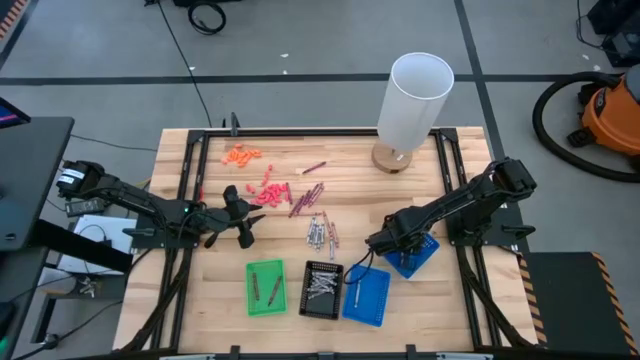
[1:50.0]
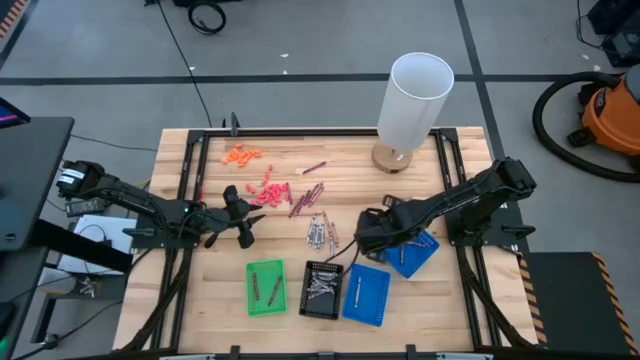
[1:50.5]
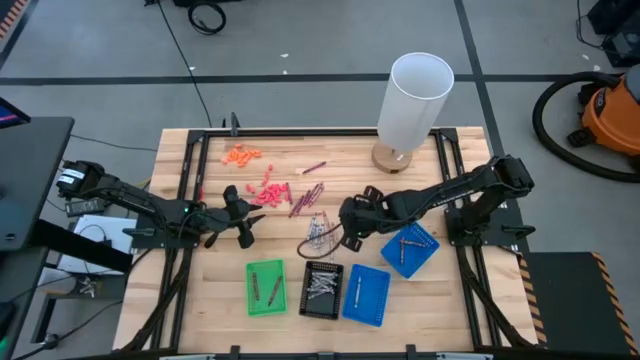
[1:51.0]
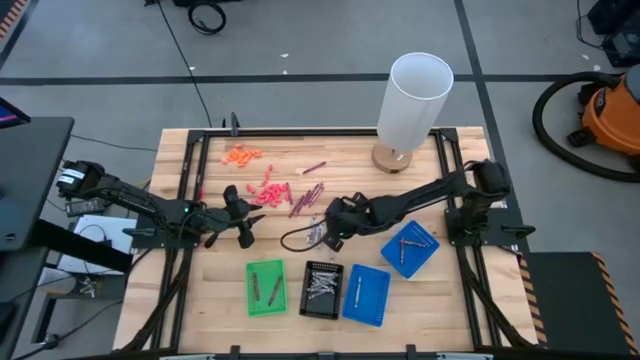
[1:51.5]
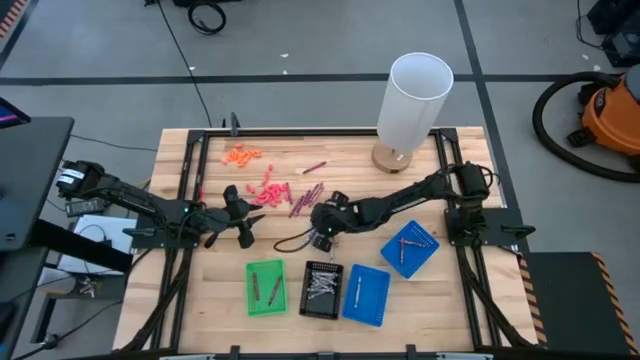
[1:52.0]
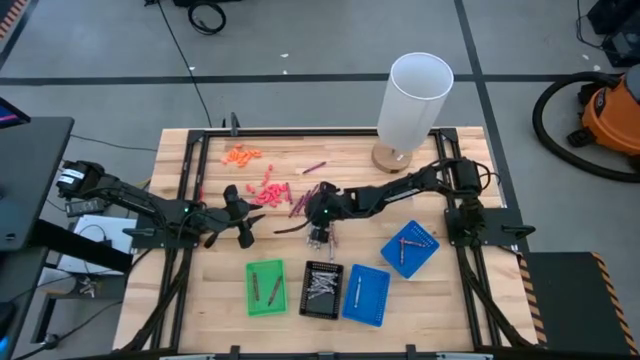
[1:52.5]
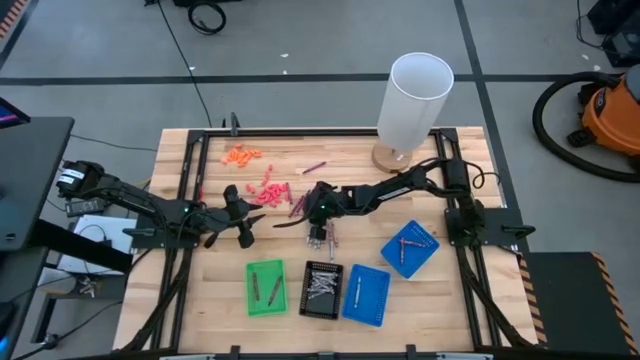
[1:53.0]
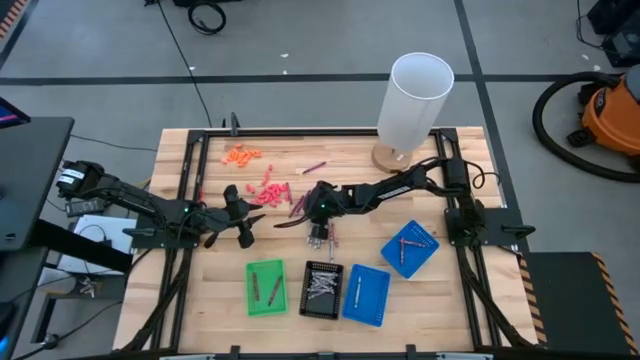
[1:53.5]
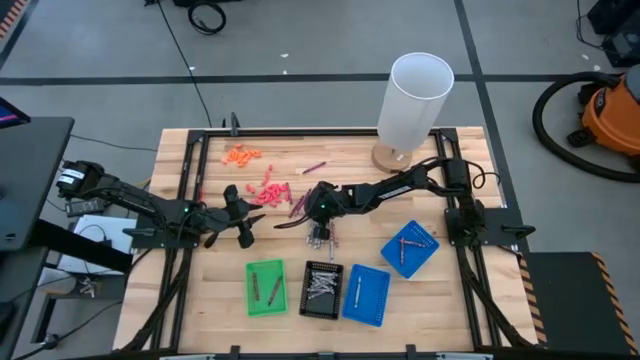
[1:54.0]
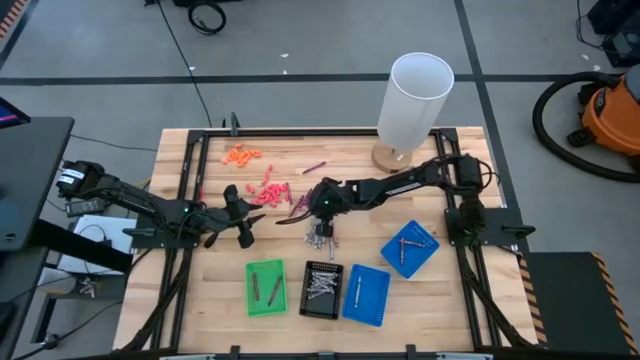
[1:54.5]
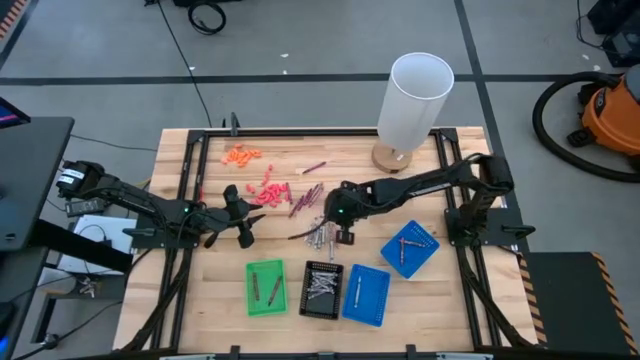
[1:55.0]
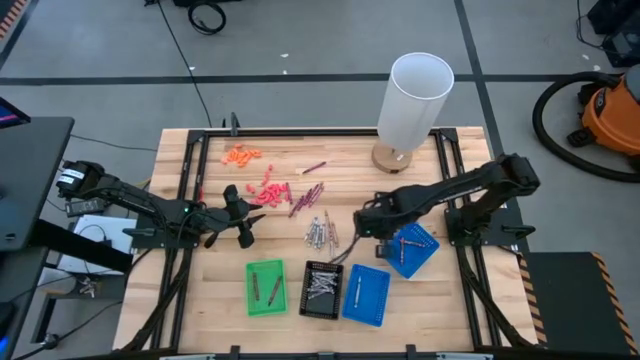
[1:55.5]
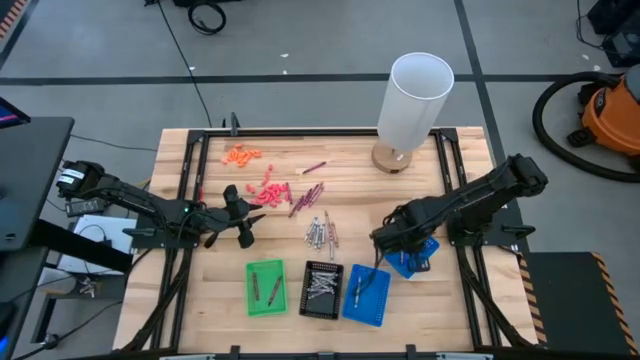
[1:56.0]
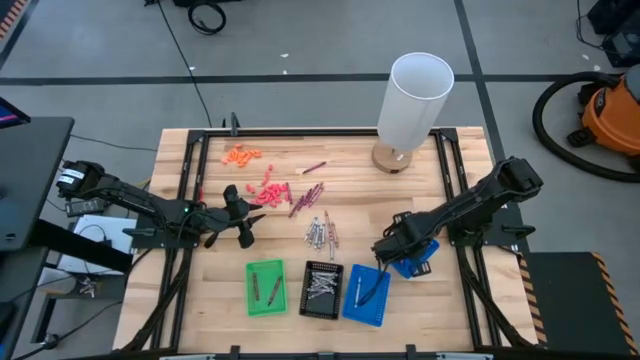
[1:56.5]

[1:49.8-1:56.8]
Task: Sort crayons
Put the pink crayon into the right blue basket

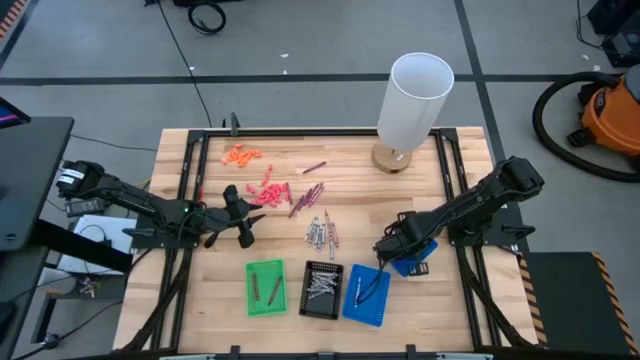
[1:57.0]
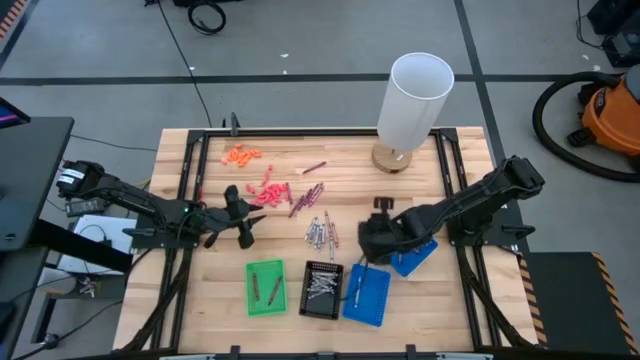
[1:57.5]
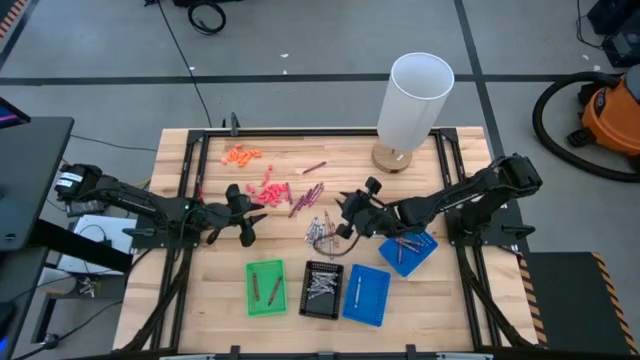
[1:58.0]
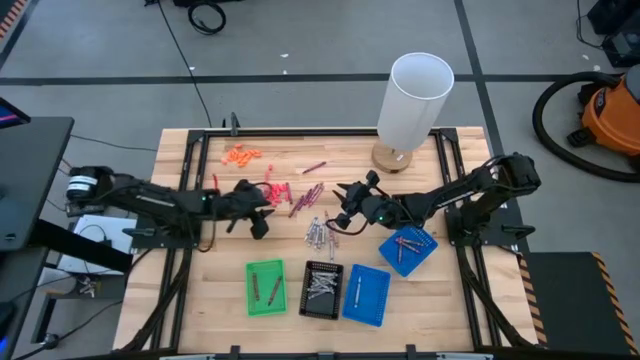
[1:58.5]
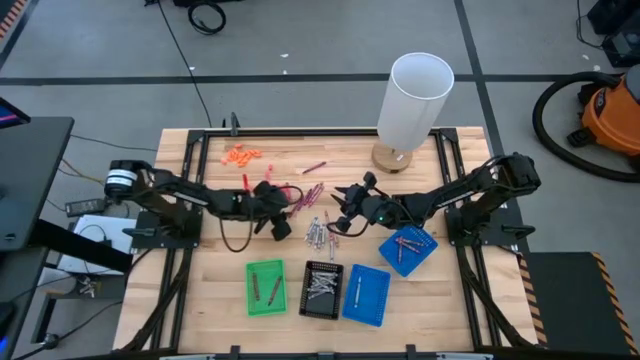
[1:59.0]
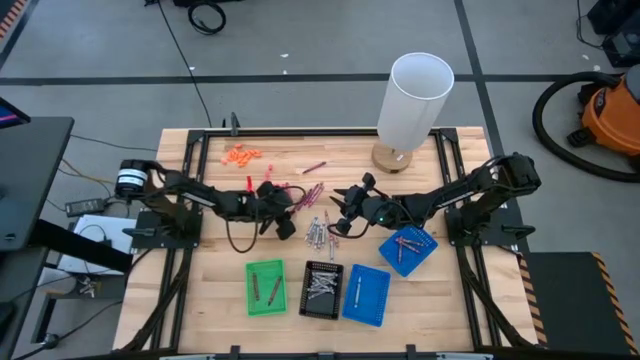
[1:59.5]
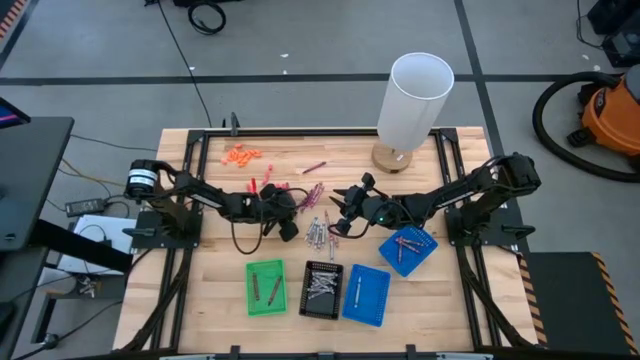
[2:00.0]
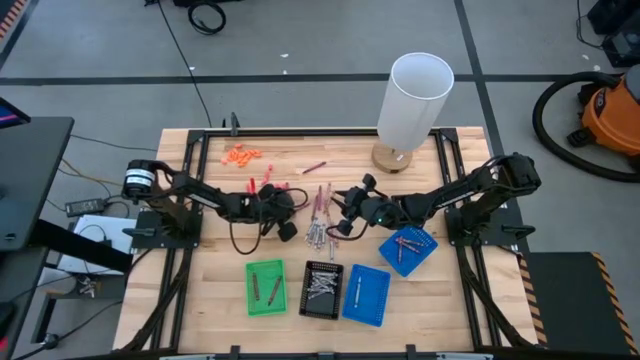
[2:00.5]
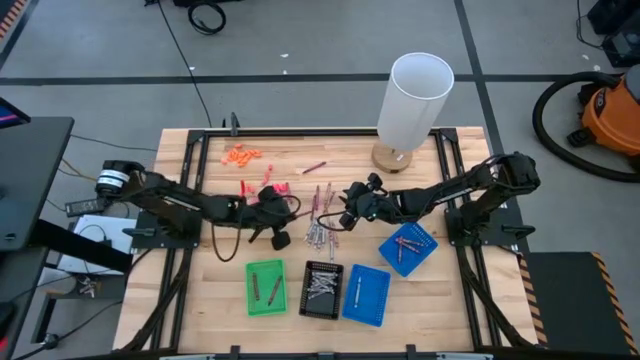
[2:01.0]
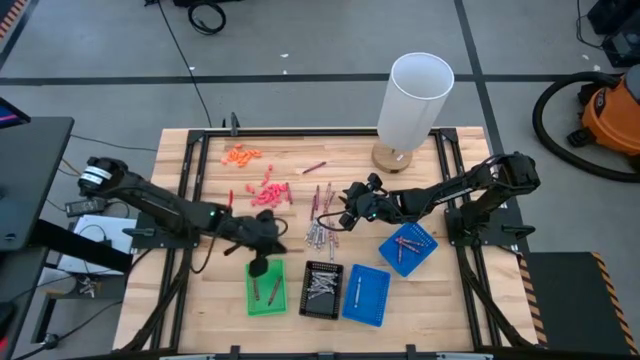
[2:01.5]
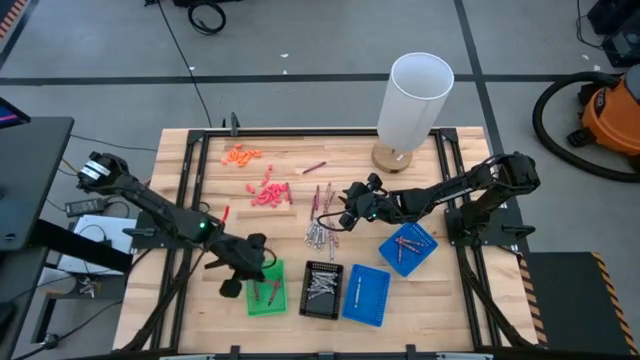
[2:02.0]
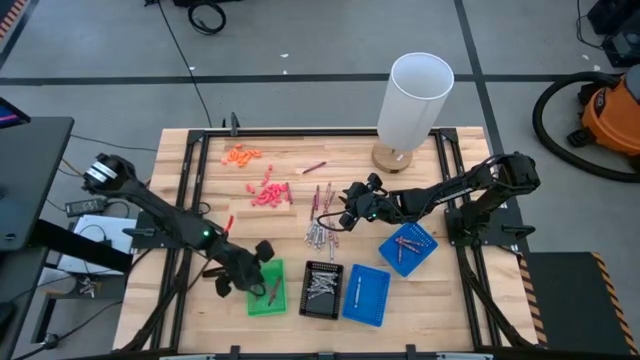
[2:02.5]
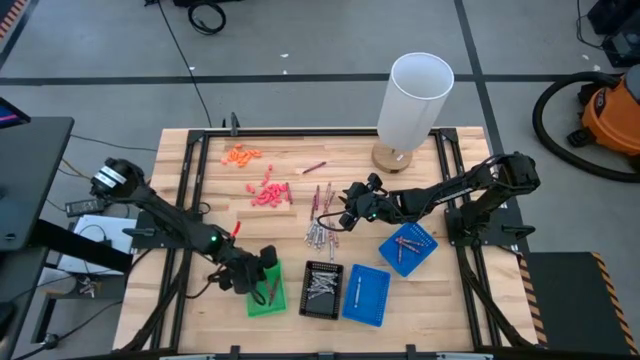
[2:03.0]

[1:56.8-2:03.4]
Put the red crayon into the green basket

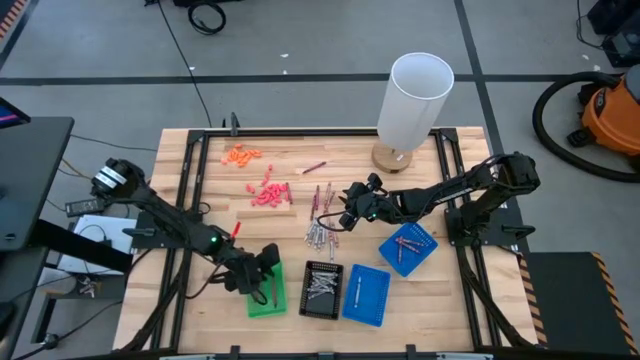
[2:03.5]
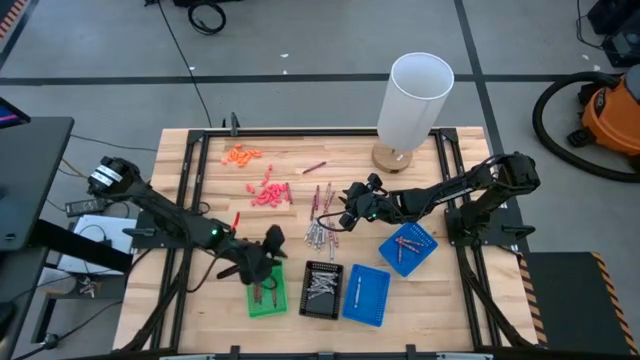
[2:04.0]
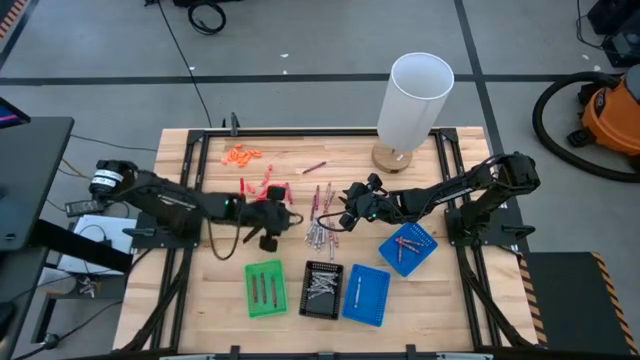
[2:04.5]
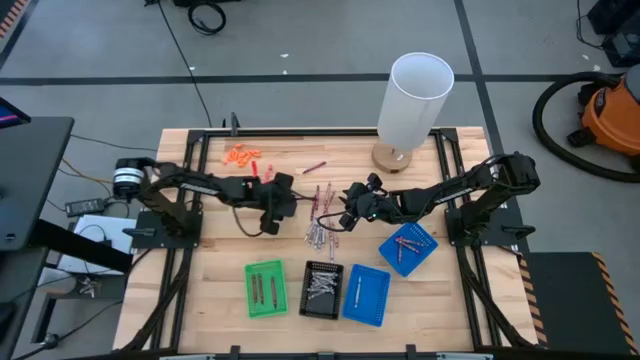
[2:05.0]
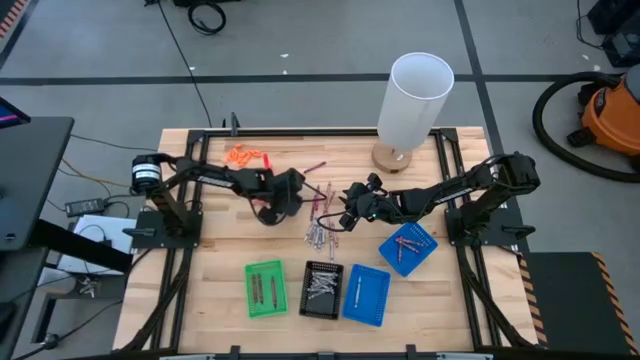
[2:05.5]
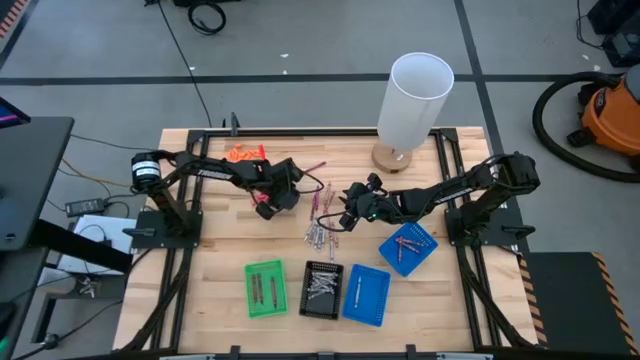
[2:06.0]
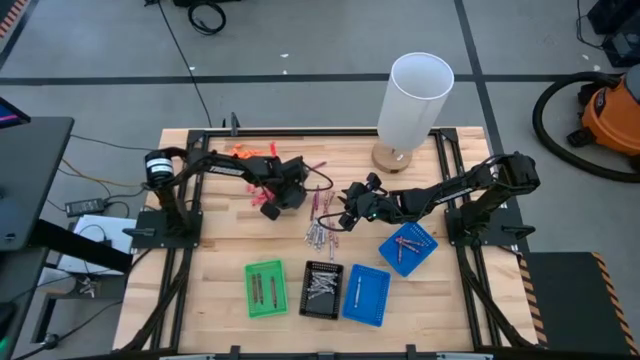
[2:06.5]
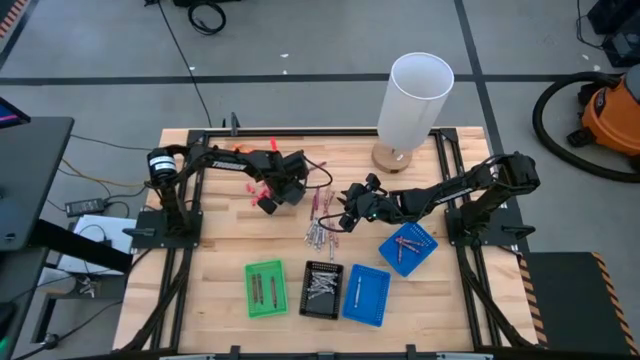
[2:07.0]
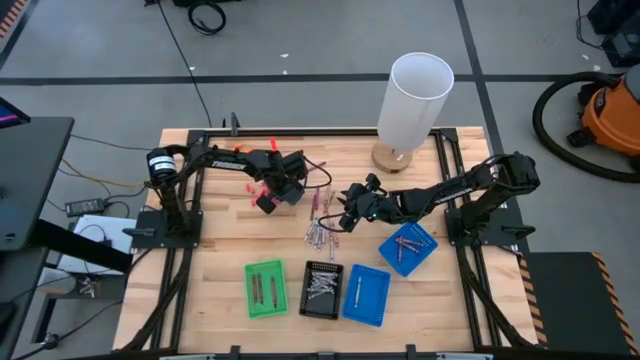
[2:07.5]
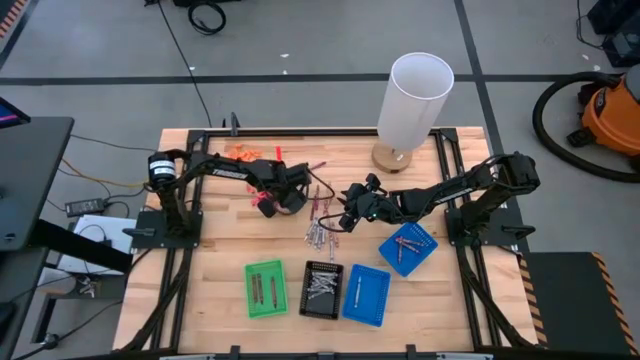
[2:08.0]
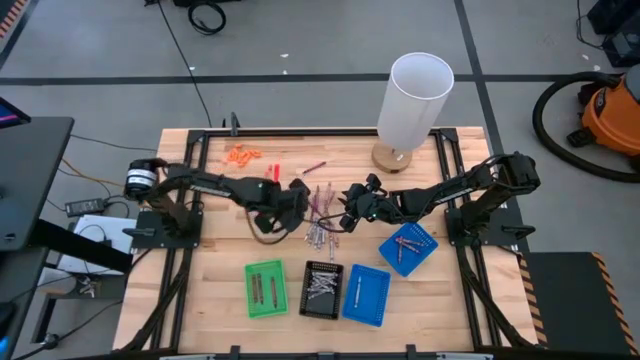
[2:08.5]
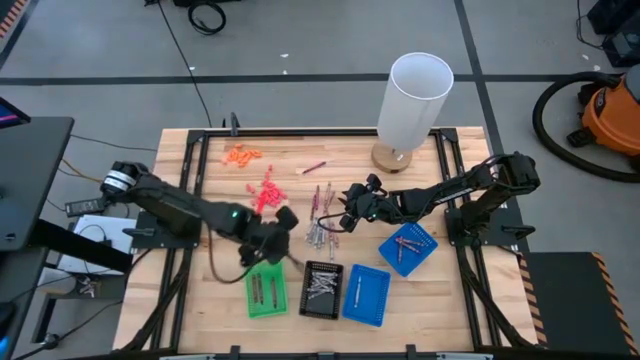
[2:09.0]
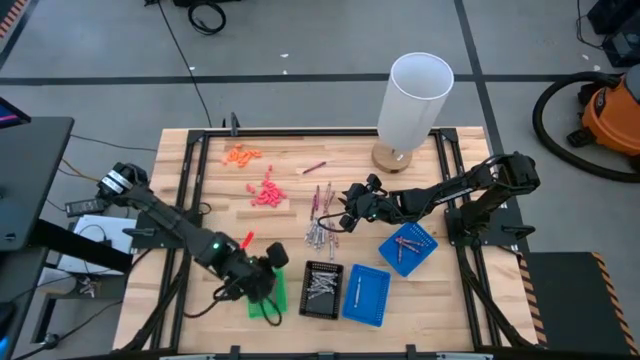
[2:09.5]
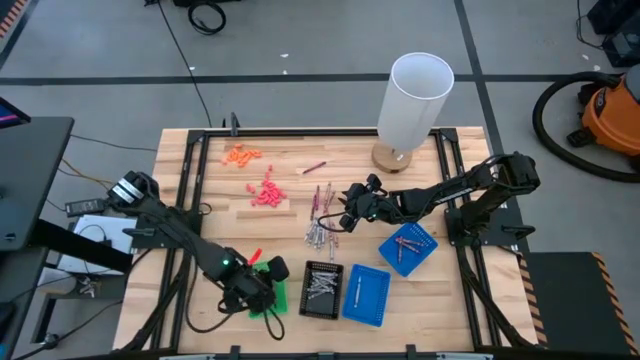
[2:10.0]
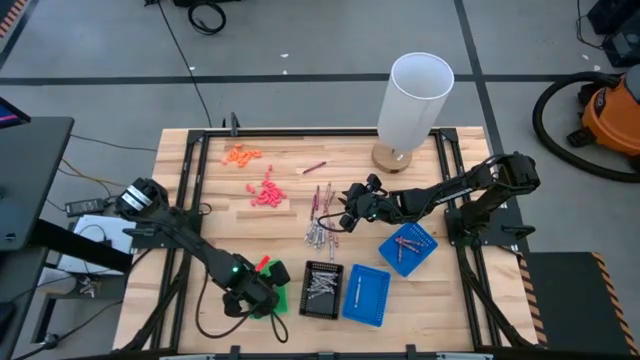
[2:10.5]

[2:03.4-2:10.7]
Put the red crayon into the green basket

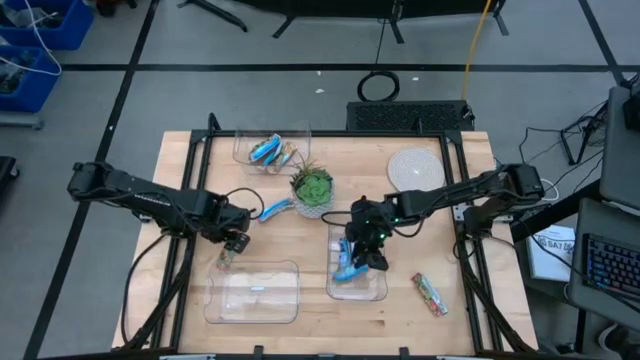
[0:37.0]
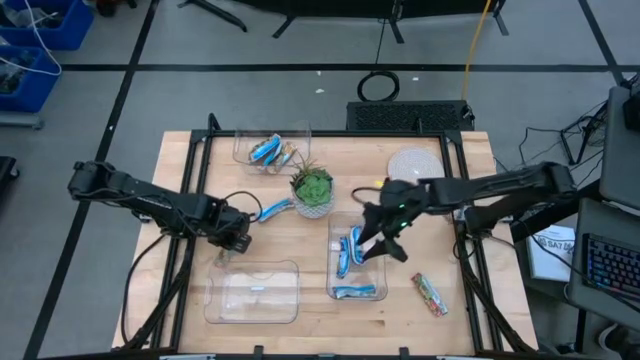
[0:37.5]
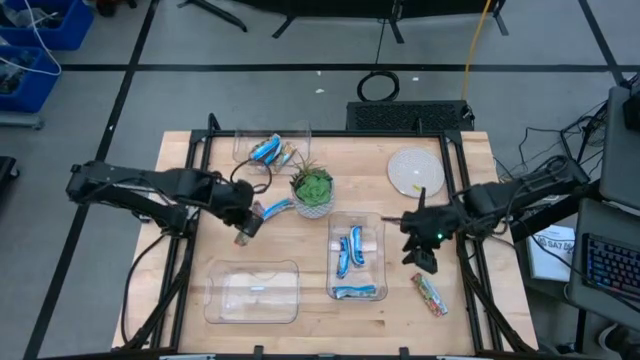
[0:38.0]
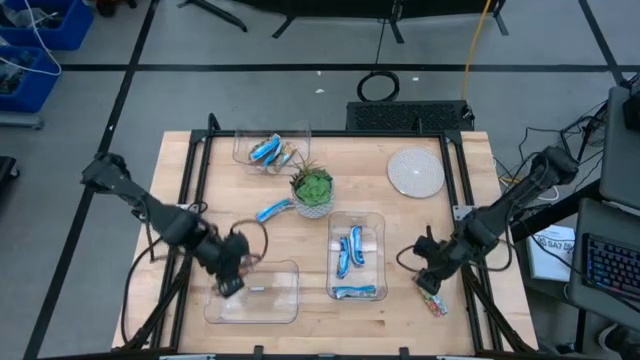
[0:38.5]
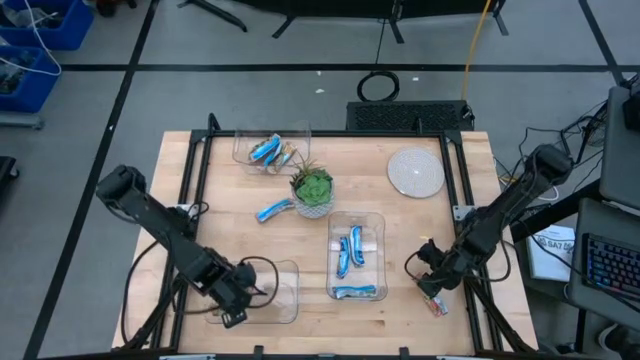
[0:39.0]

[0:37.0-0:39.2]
Task: Pick and place Granola Bars by type
Put the middle red granola bar into the bottom transparent bin
